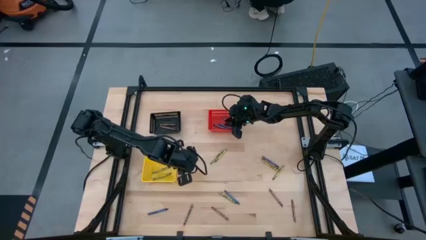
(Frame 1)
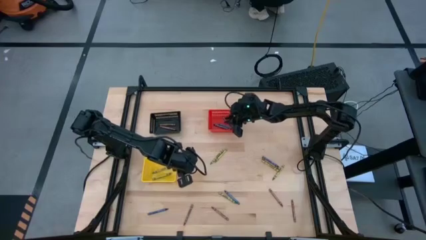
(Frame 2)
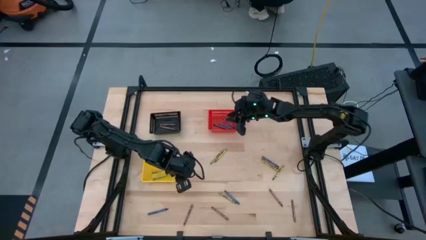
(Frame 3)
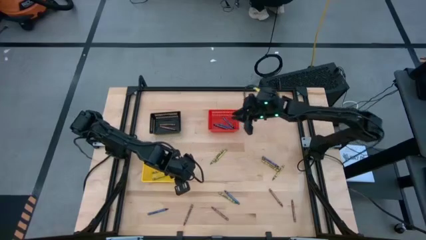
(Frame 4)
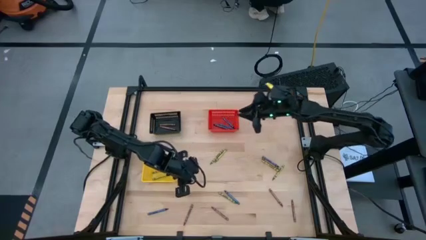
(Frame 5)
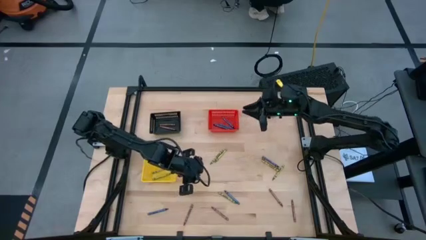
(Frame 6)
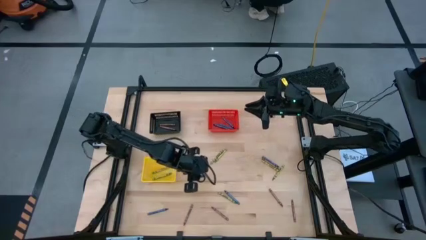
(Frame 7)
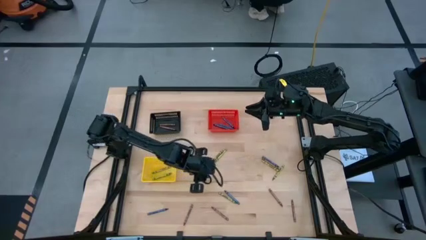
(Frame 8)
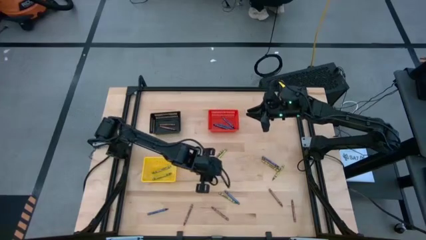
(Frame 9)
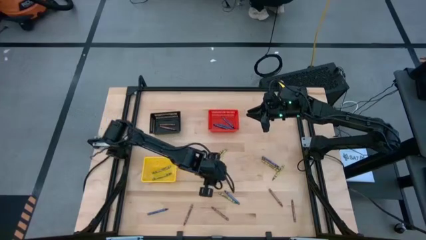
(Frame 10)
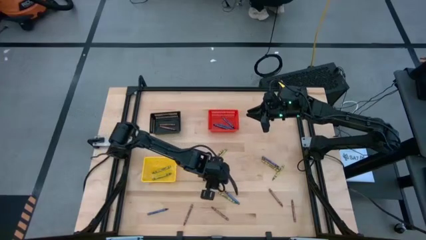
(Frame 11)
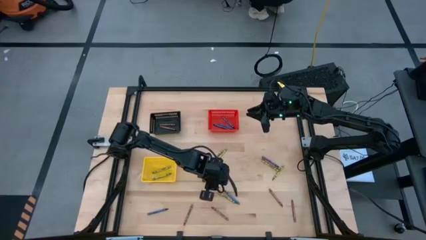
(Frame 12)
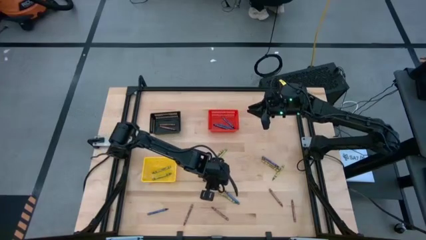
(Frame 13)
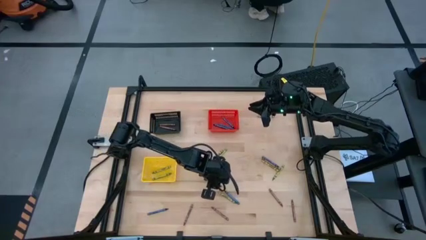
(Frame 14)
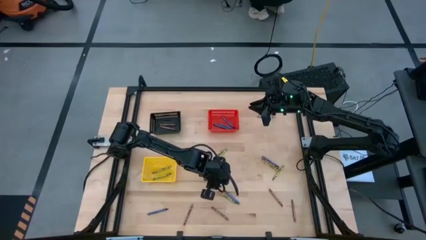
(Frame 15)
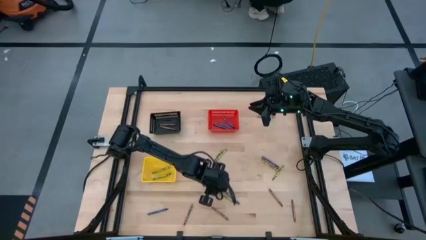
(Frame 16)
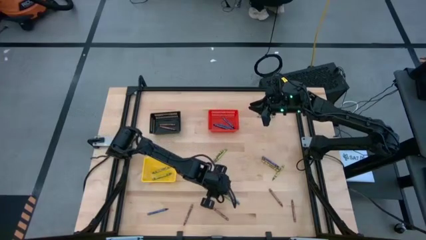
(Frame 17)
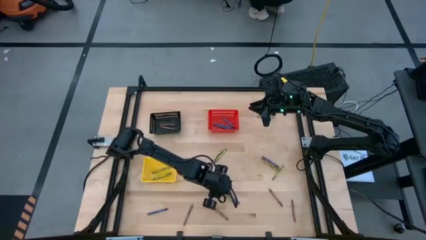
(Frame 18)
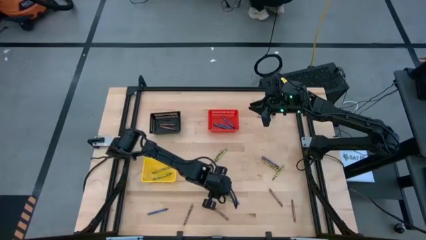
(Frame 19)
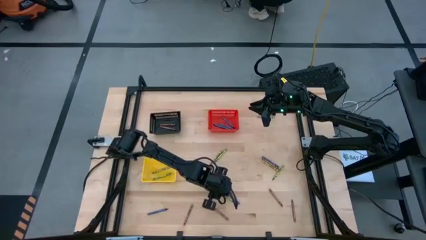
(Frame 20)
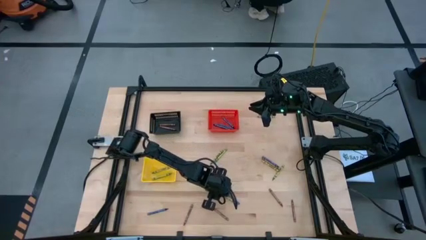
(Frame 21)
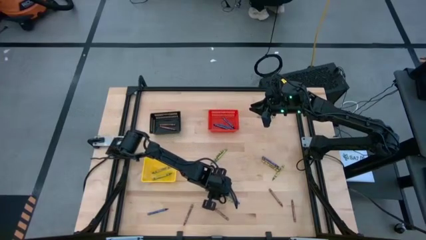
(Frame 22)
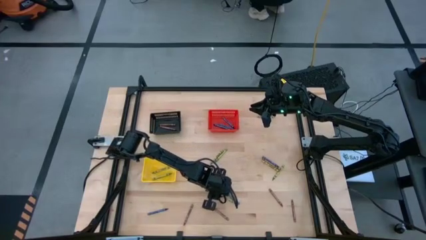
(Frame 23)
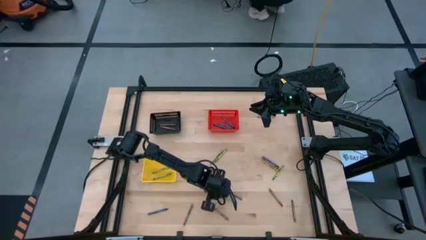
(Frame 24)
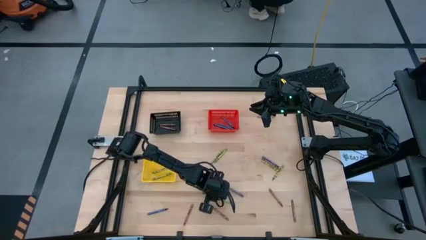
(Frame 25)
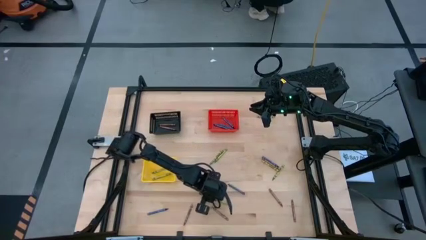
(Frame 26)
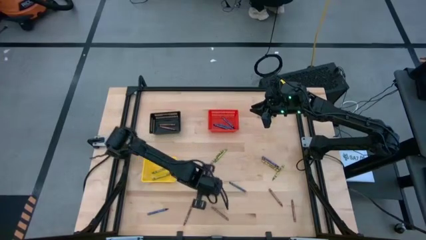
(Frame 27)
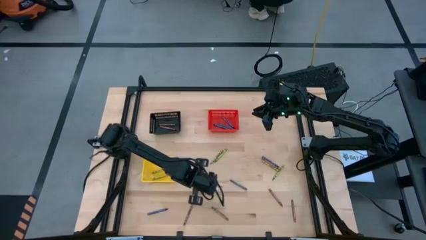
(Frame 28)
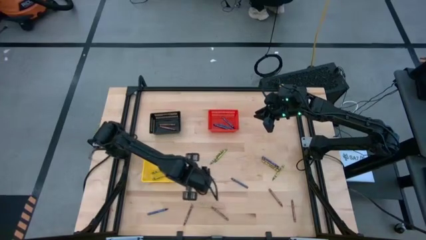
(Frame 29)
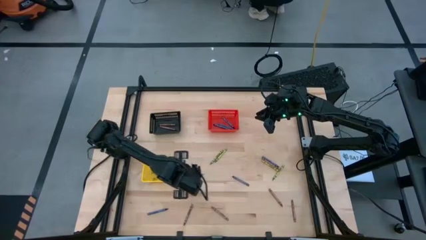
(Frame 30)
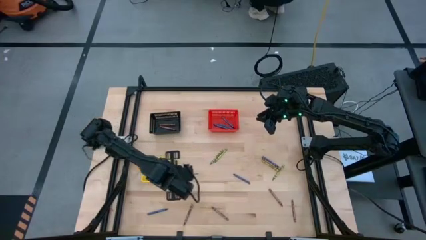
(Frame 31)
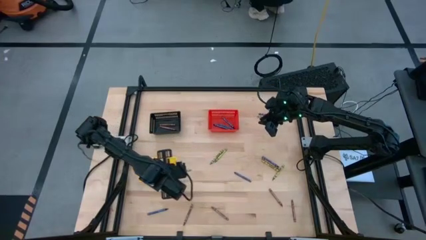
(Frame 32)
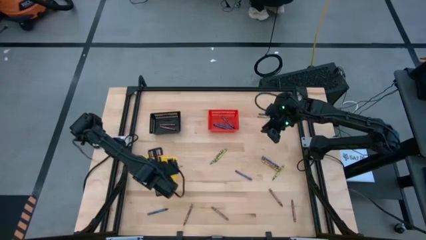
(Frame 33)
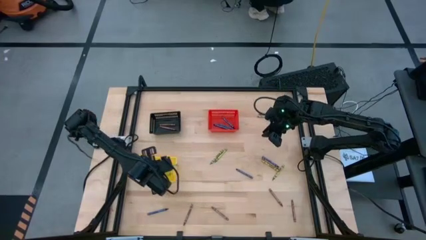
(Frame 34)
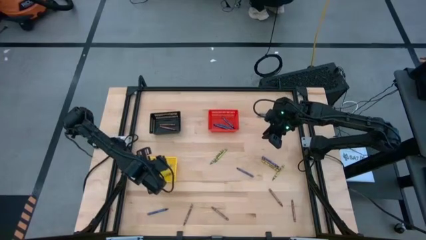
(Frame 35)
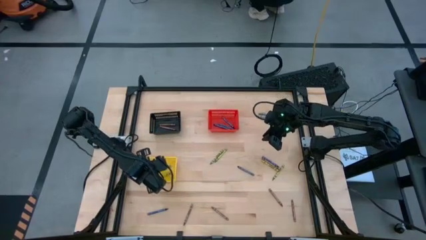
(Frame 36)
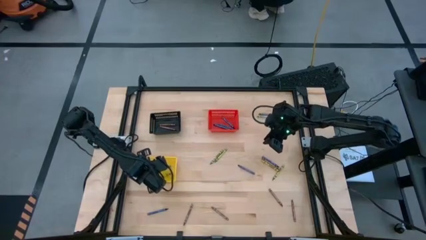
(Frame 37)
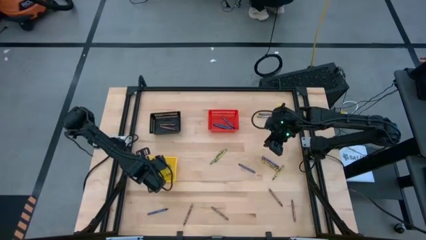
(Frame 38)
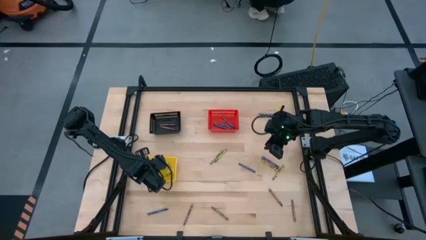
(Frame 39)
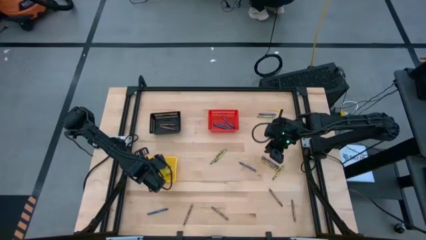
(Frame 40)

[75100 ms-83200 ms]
Task: Sort crayons
Put the green crayon into the yellow bin

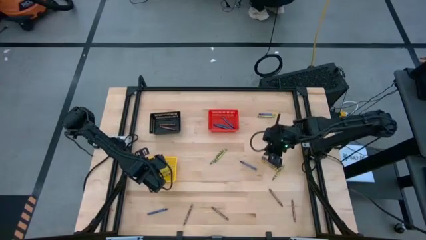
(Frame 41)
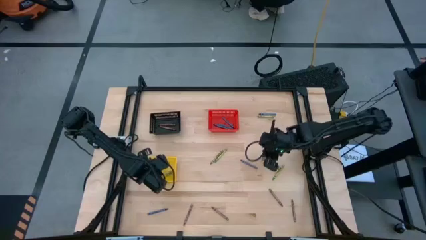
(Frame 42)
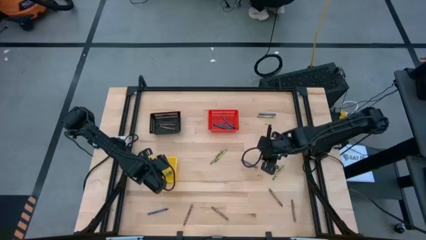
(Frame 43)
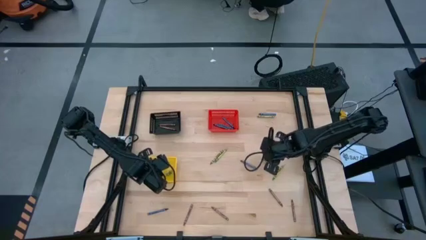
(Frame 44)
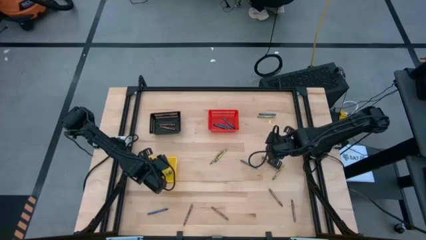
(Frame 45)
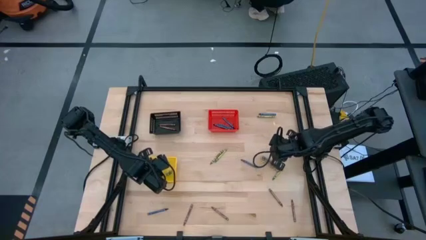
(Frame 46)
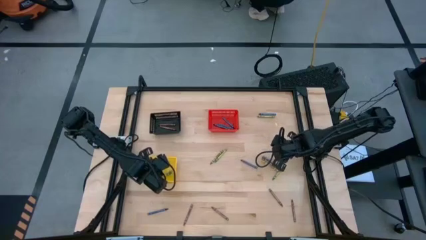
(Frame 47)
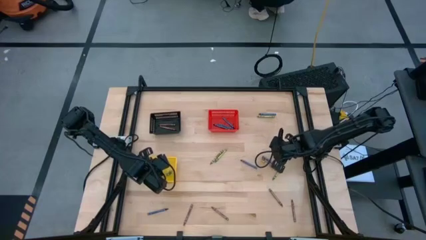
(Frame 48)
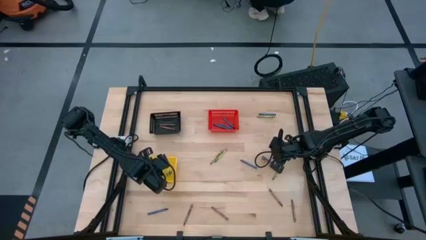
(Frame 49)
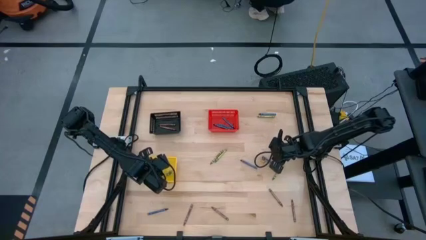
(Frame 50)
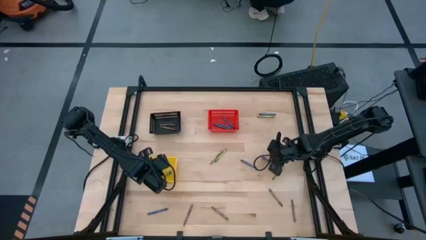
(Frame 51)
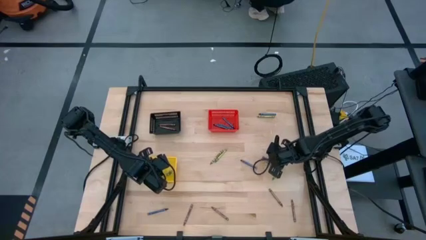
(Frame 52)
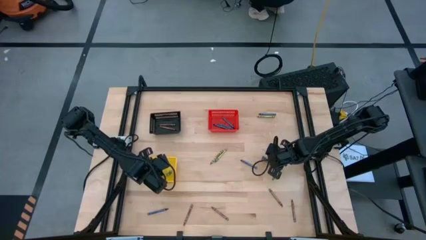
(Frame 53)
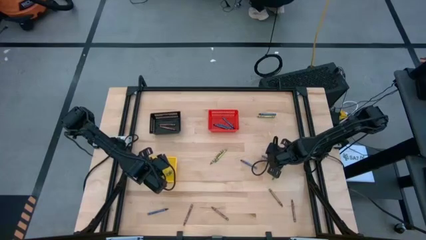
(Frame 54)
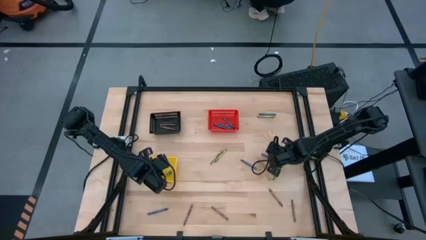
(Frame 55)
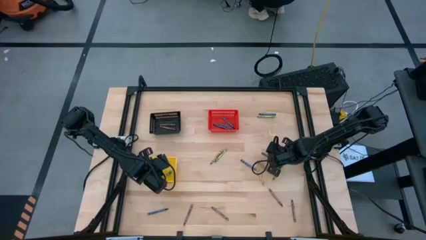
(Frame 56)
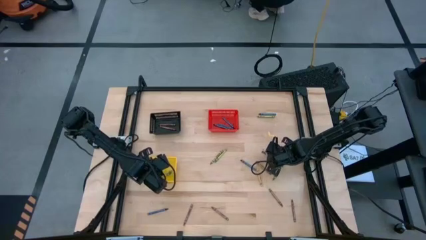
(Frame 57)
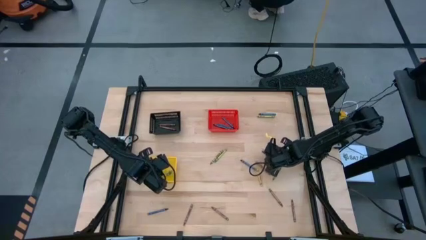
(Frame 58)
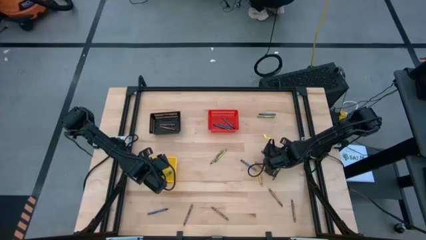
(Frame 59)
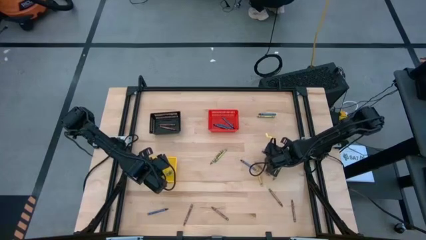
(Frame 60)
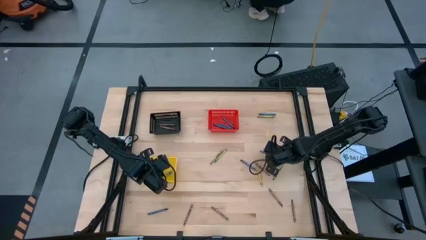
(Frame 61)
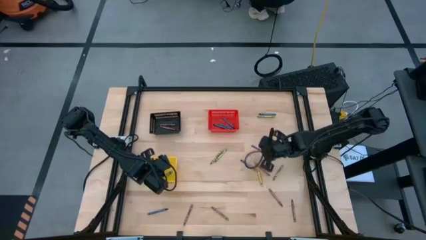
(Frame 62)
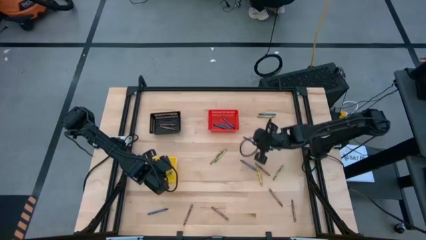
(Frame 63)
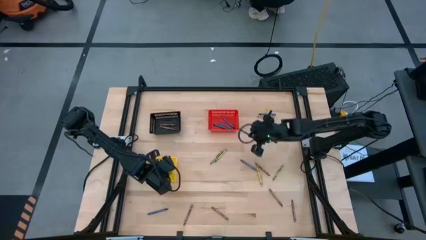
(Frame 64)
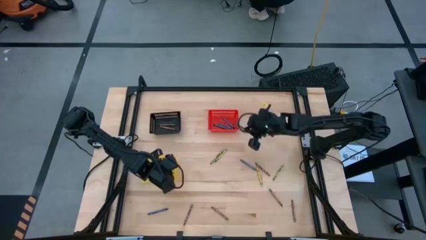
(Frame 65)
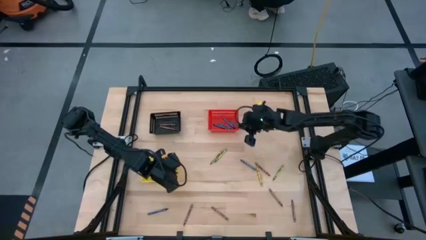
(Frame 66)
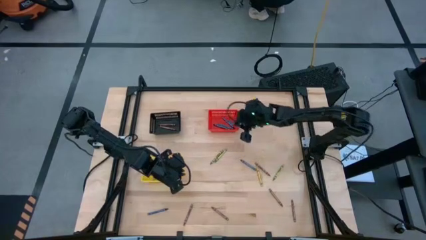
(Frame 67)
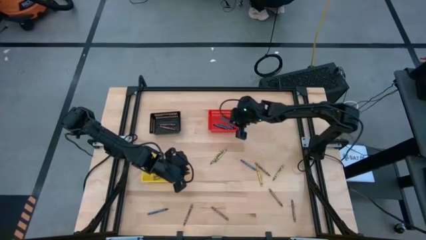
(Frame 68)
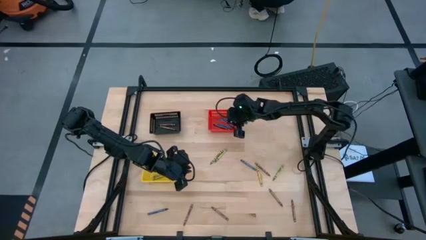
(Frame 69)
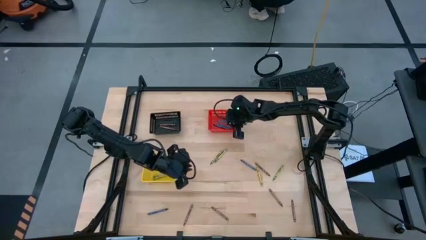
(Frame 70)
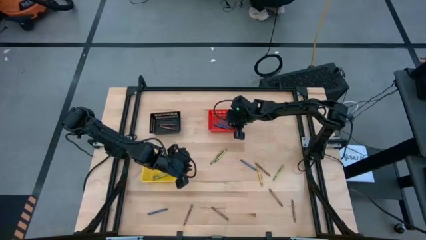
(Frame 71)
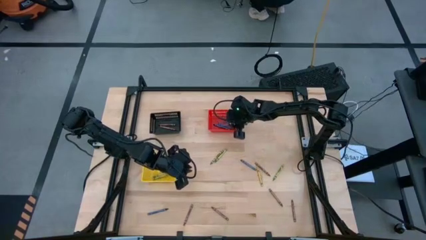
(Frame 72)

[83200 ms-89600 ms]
Put the blue crayon into the red bin
